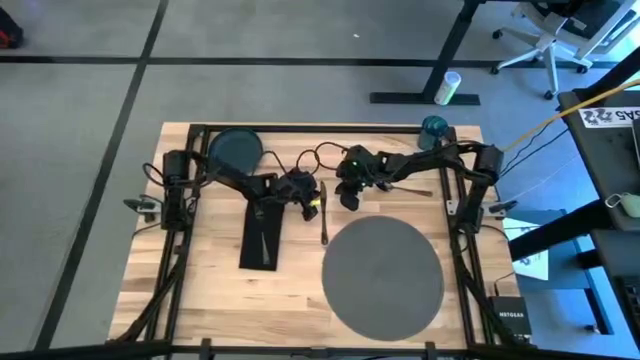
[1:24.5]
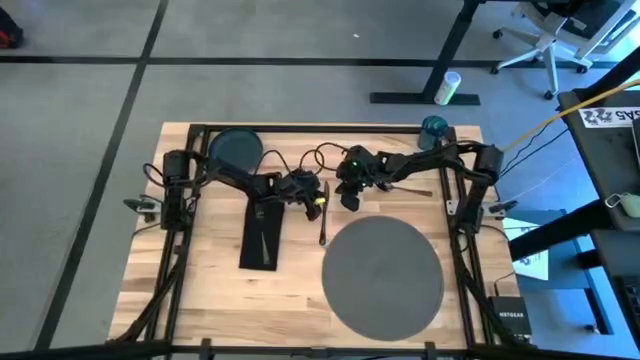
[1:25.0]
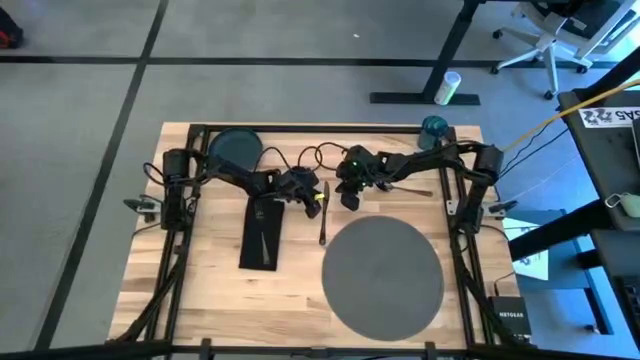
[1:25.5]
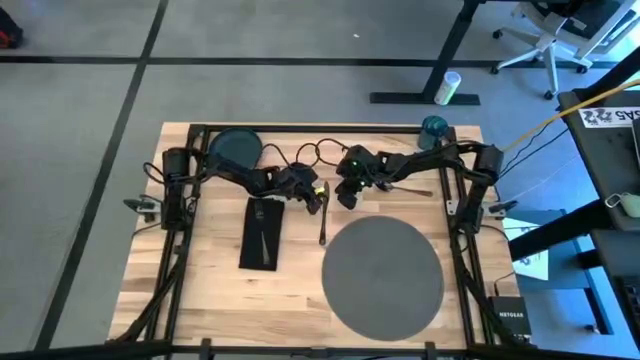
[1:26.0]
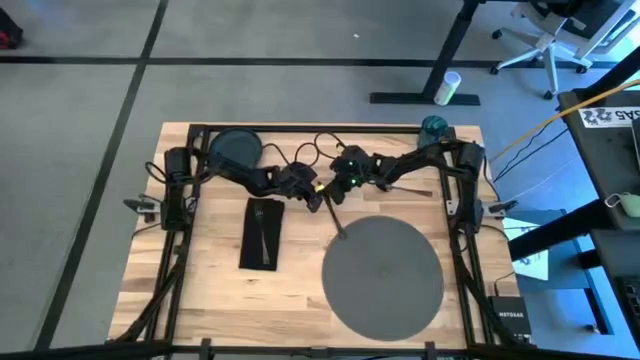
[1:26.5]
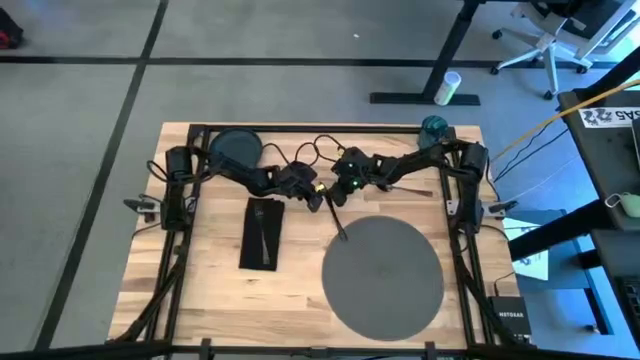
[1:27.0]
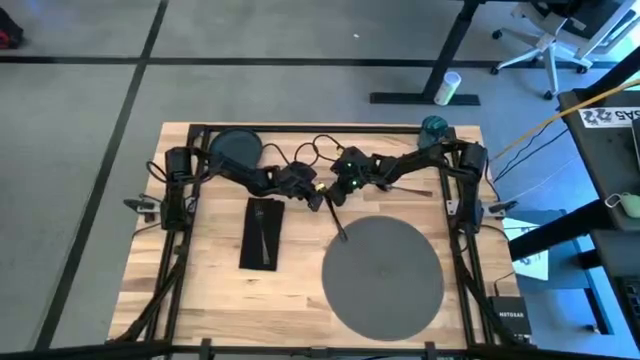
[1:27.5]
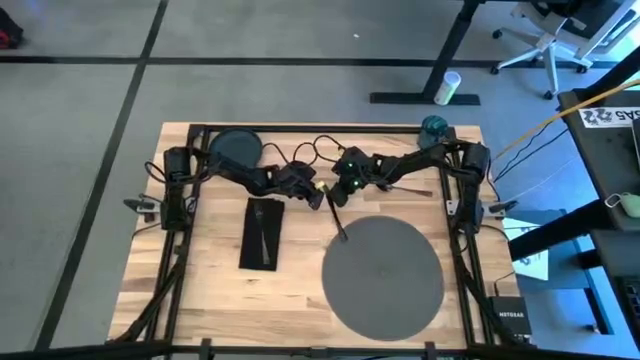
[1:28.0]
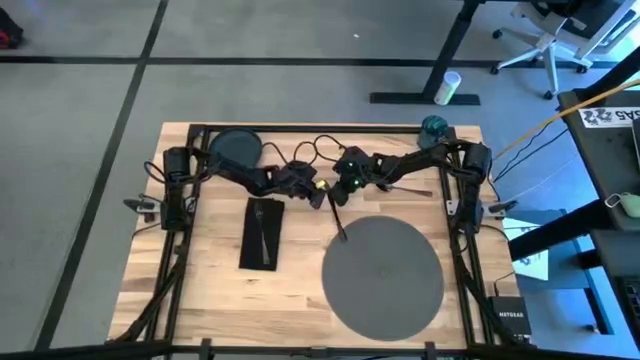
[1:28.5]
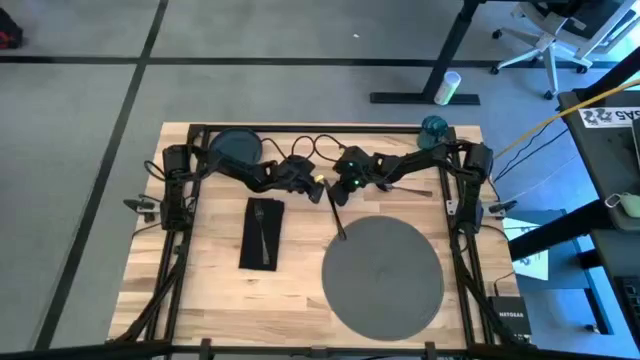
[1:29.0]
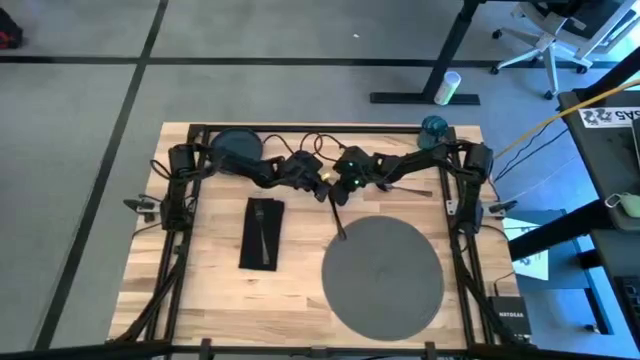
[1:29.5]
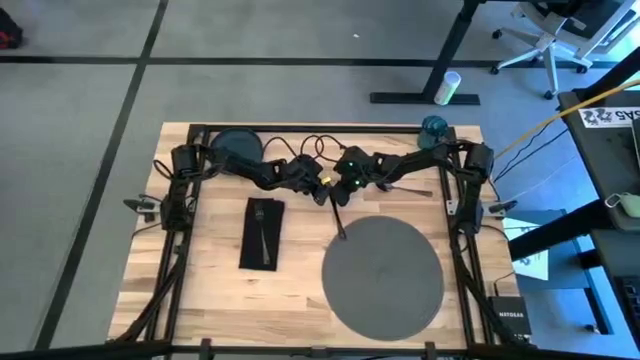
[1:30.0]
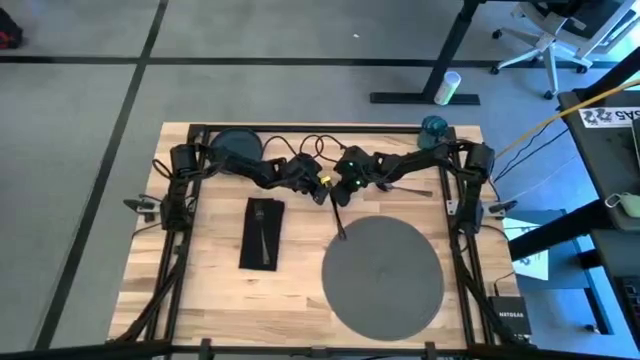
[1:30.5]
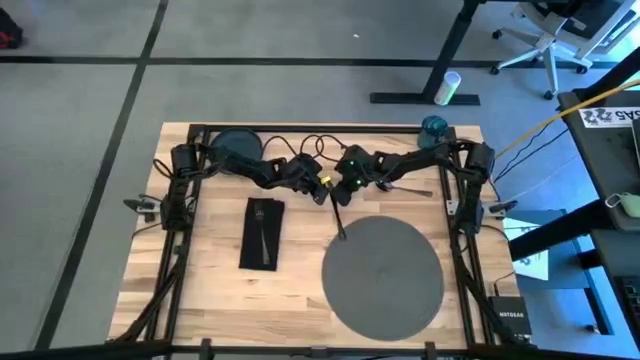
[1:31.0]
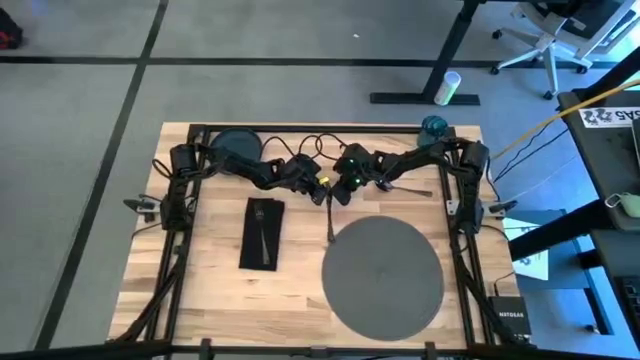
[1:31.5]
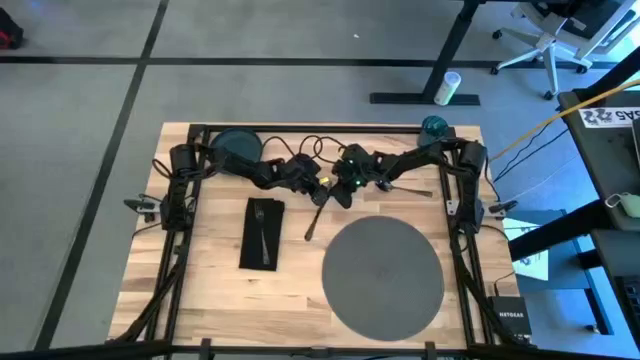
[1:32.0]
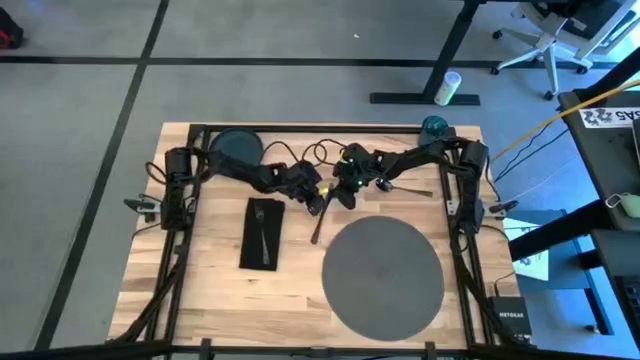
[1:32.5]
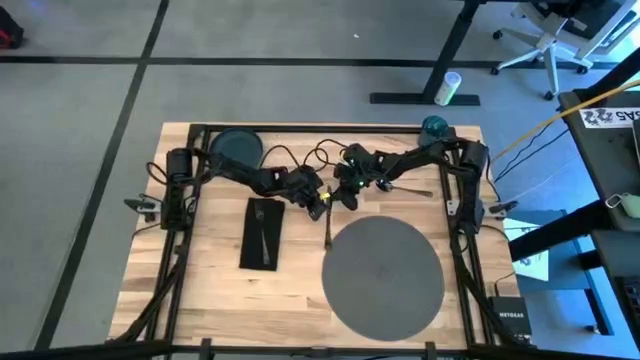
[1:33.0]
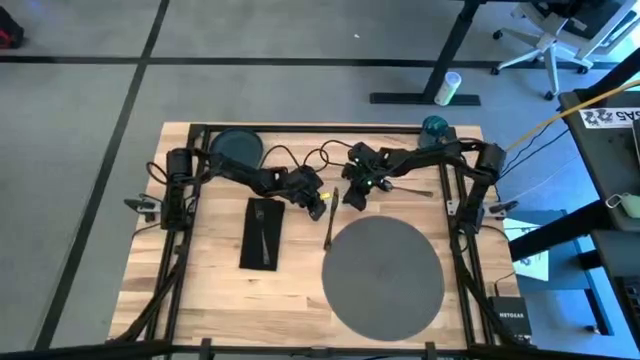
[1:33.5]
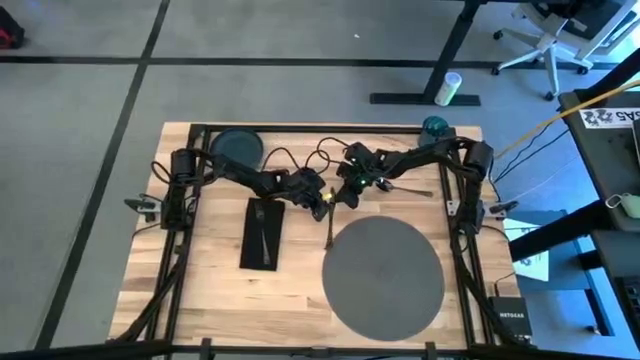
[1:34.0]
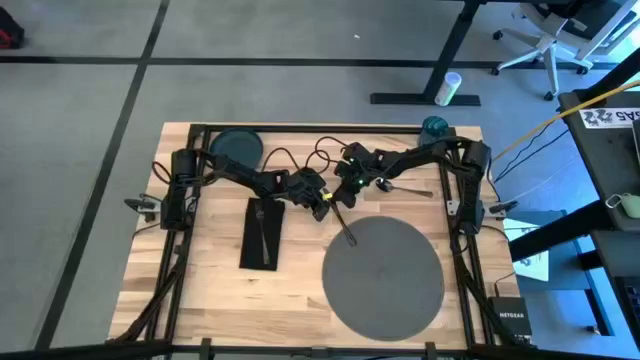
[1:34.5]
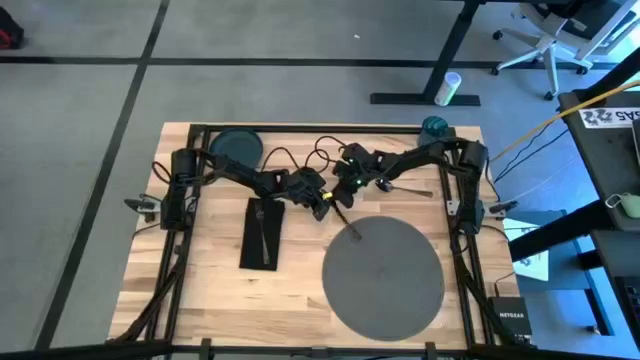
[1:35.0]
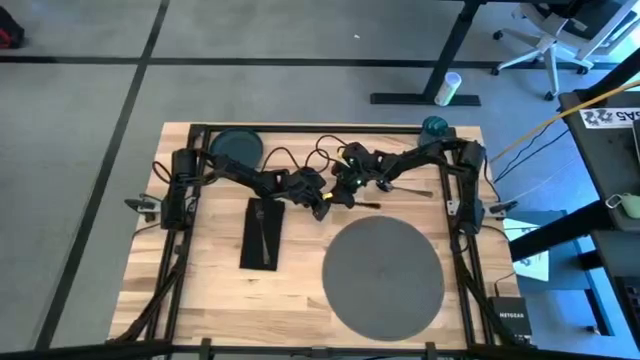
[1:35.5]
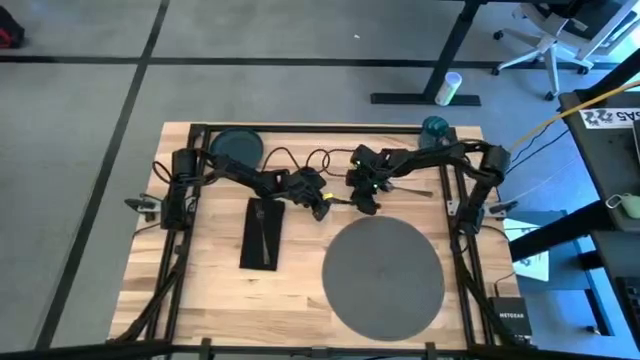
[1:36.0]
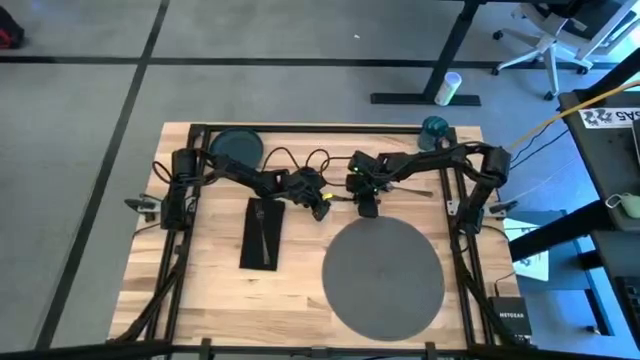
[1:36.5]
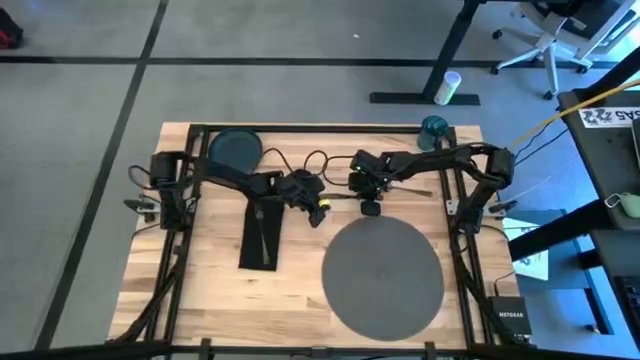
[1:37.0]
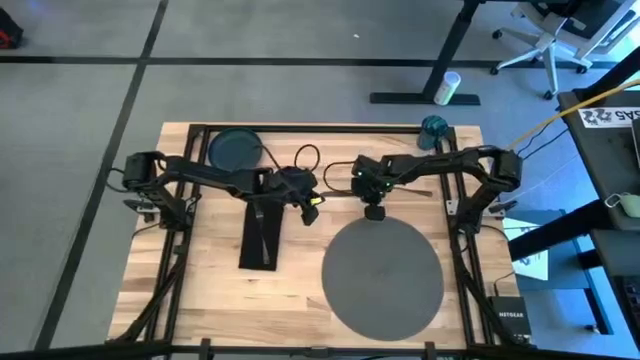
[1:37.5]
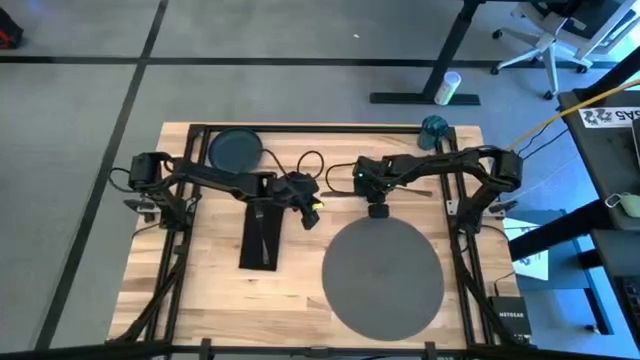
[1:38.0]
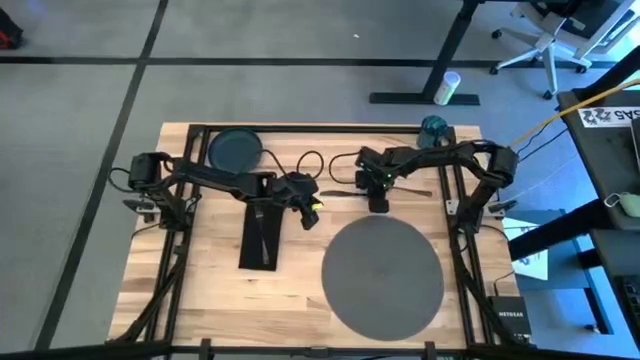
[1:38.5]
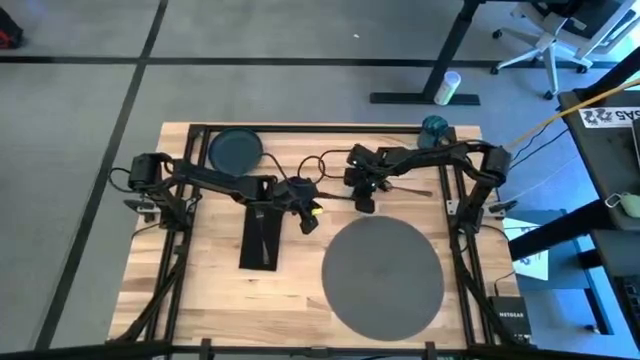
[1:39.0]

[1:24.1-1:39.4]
Task: Set table place
Put the black knife on the gray table mat

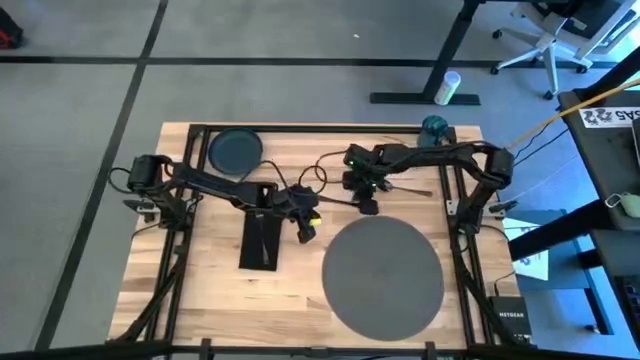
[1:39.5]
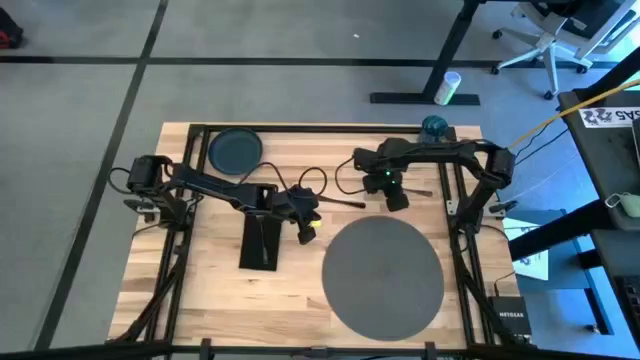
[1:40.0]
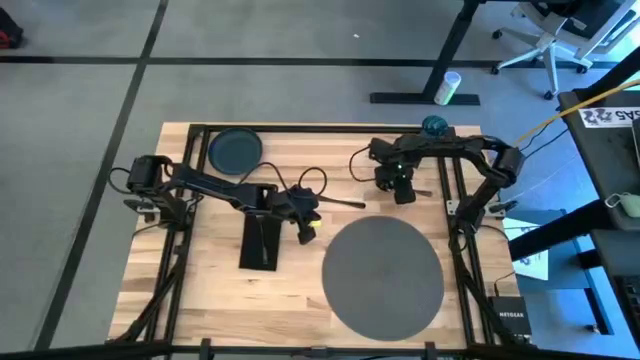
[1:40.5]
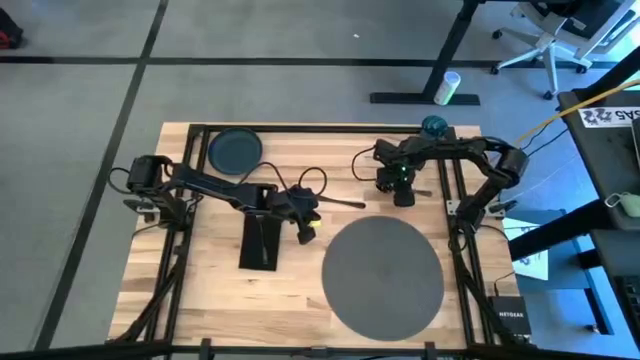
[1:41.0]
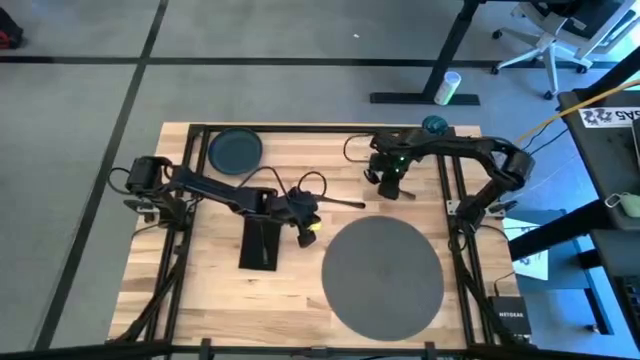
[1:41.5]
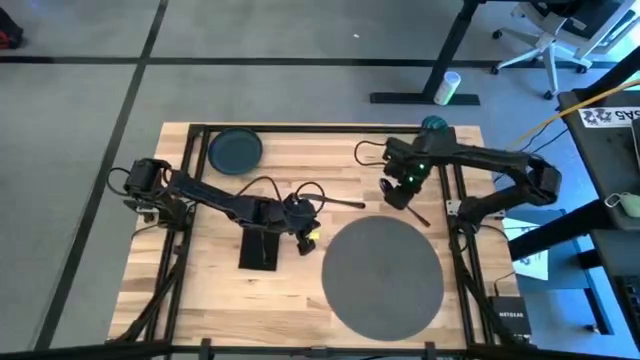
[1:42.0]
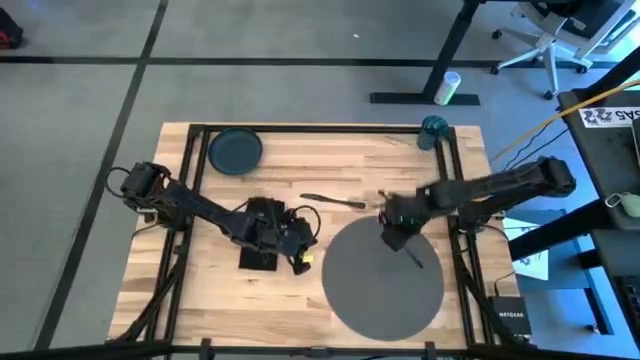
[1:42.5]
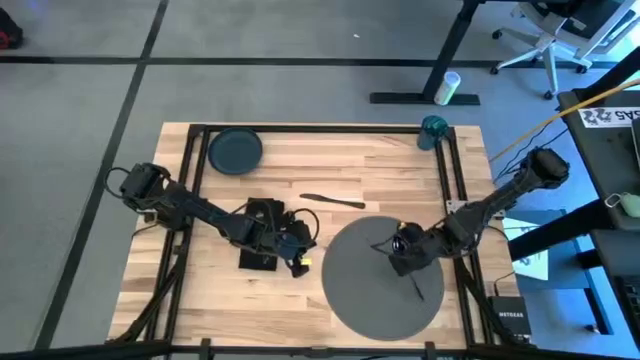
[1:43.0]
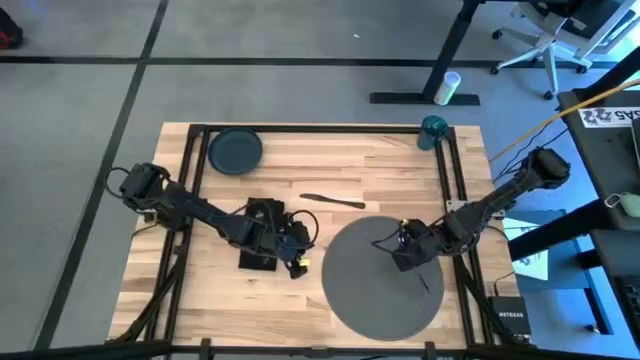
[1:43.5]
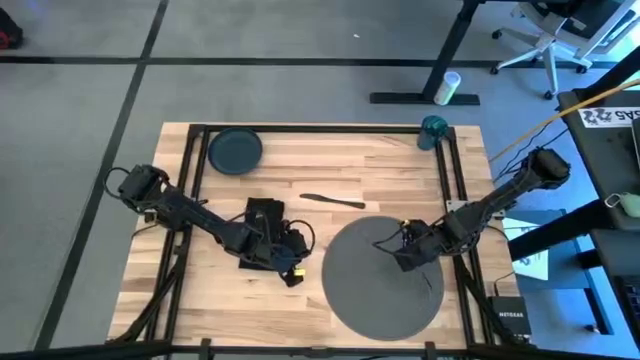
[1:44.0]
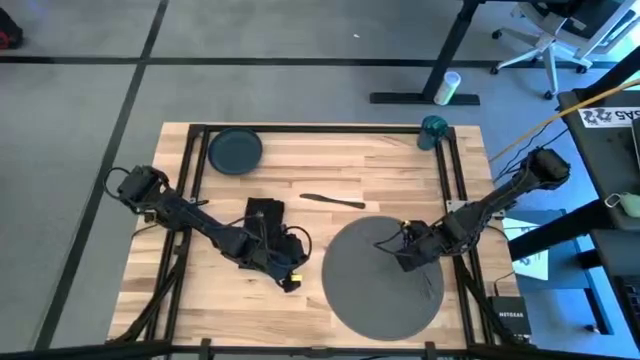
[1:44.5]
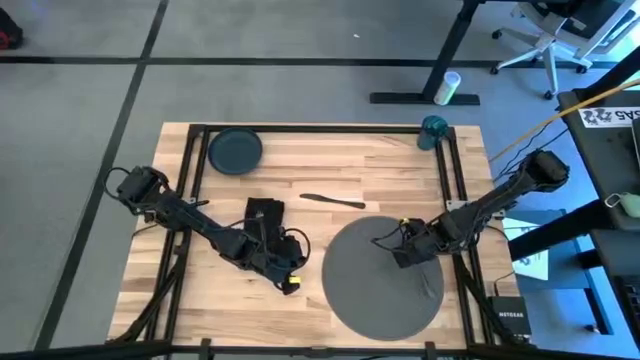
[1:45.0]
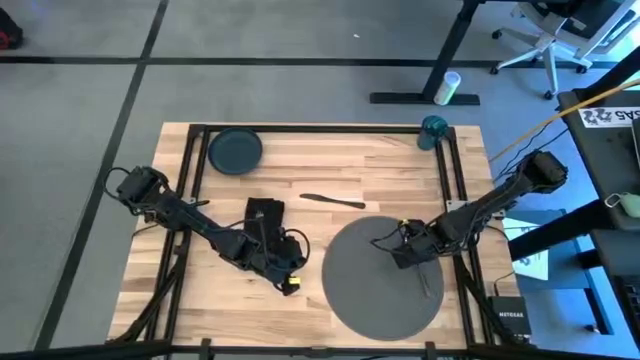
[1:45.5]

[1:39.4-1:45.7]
Put the black spoon on the gray table mat
